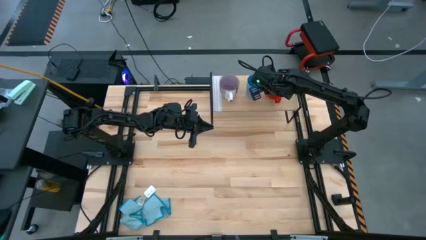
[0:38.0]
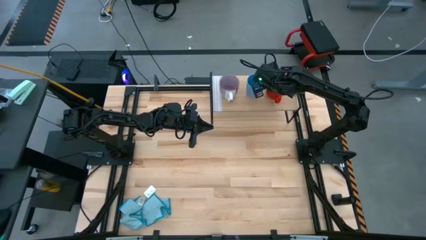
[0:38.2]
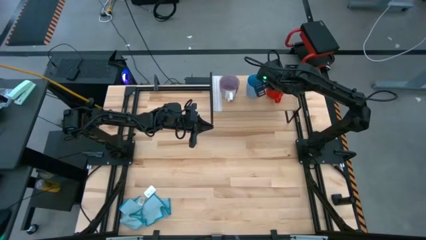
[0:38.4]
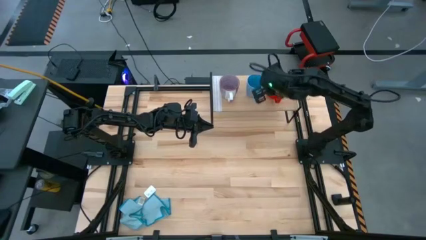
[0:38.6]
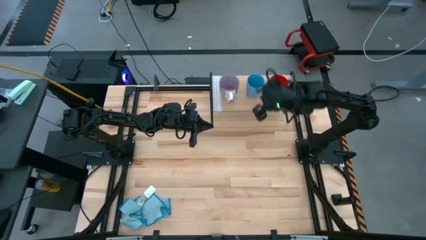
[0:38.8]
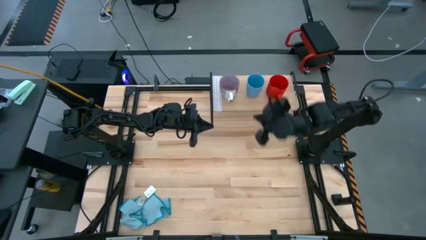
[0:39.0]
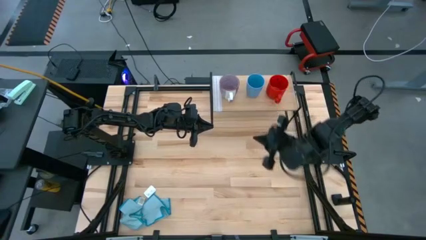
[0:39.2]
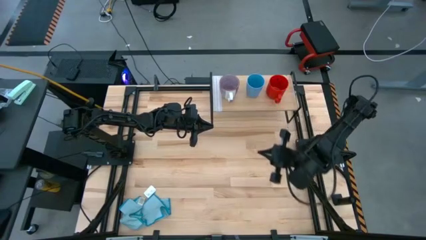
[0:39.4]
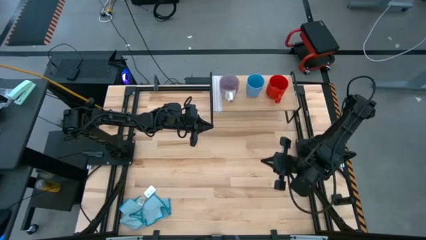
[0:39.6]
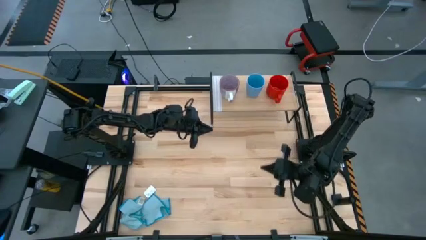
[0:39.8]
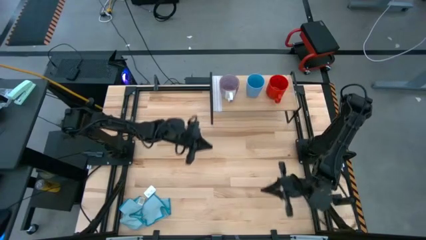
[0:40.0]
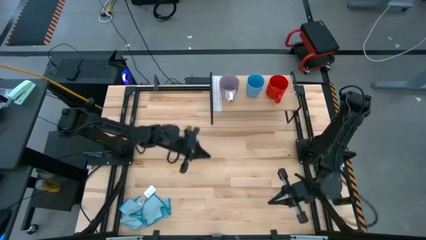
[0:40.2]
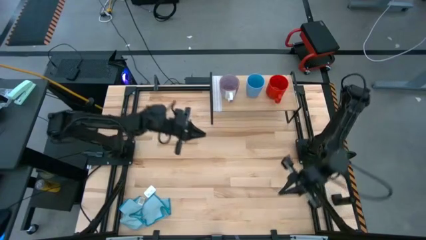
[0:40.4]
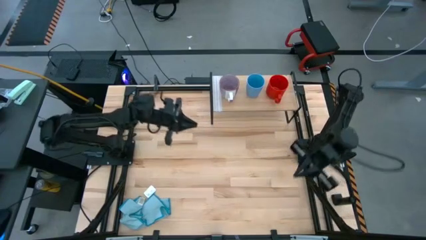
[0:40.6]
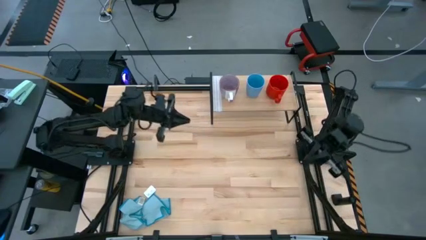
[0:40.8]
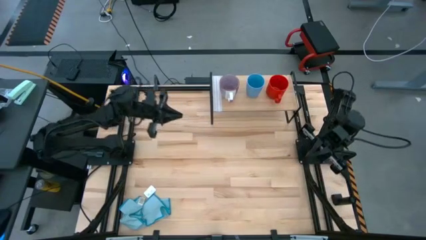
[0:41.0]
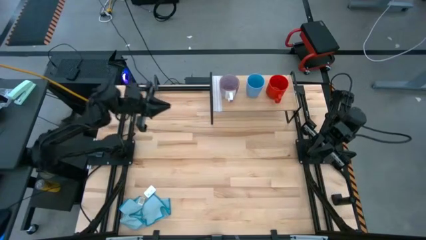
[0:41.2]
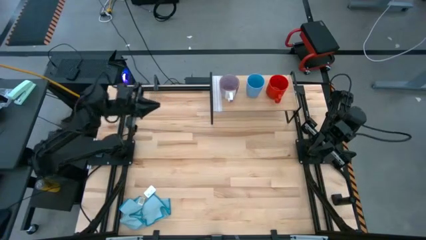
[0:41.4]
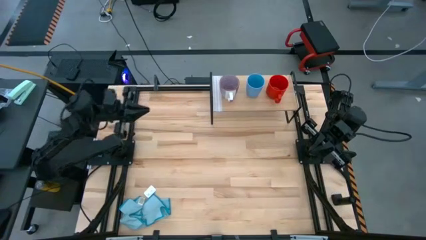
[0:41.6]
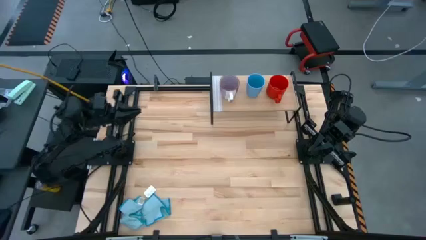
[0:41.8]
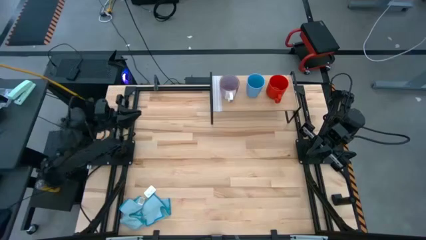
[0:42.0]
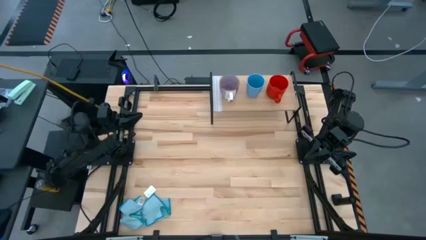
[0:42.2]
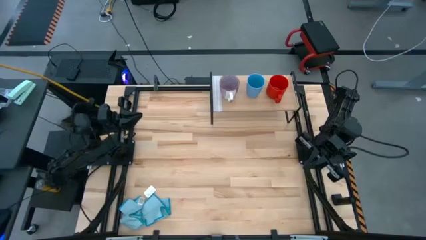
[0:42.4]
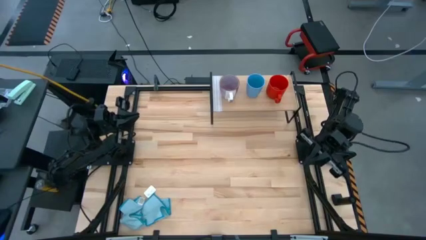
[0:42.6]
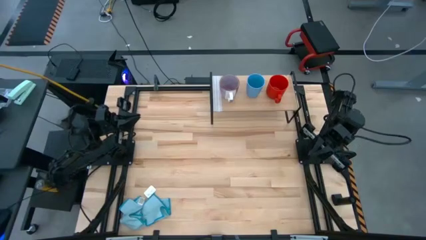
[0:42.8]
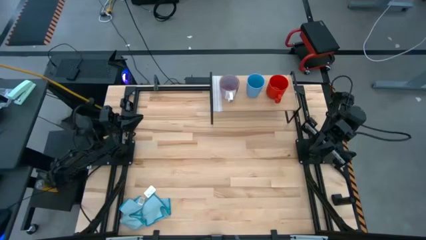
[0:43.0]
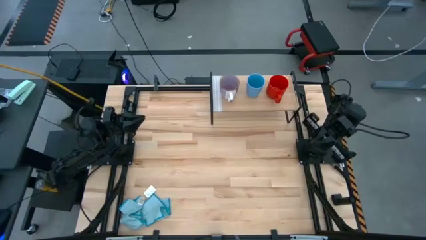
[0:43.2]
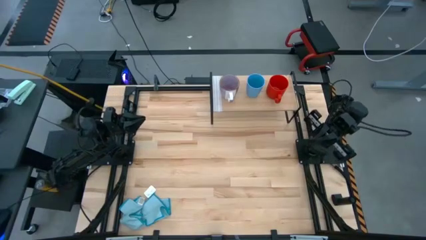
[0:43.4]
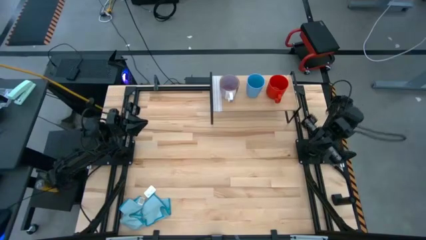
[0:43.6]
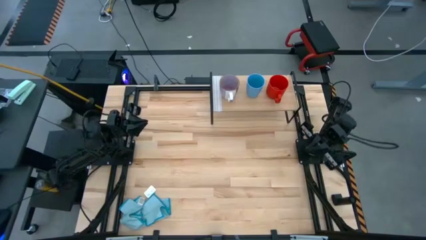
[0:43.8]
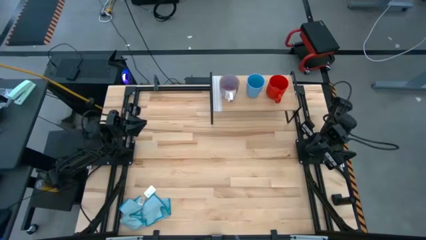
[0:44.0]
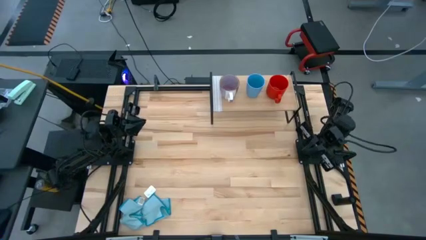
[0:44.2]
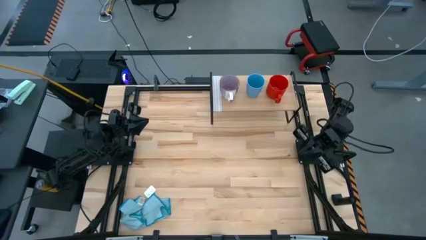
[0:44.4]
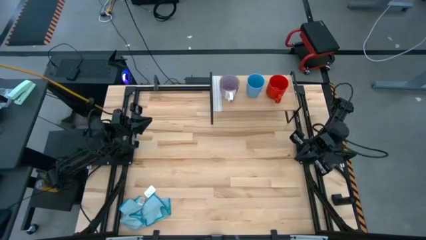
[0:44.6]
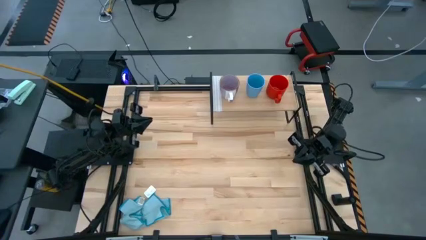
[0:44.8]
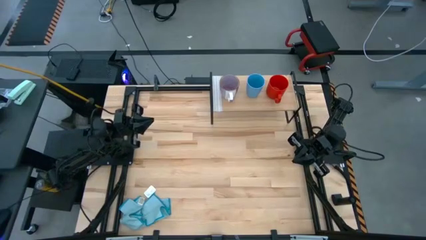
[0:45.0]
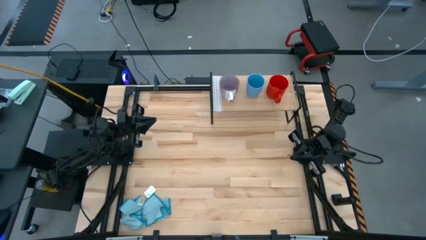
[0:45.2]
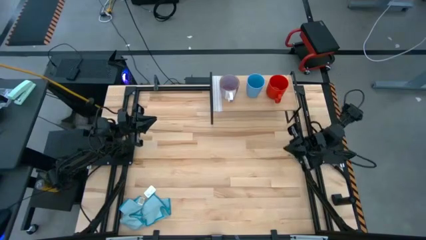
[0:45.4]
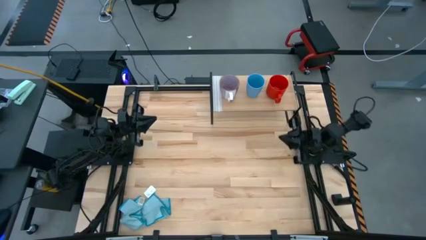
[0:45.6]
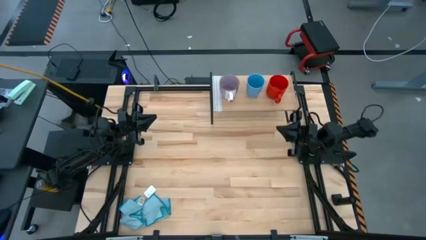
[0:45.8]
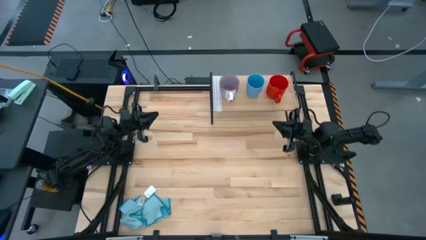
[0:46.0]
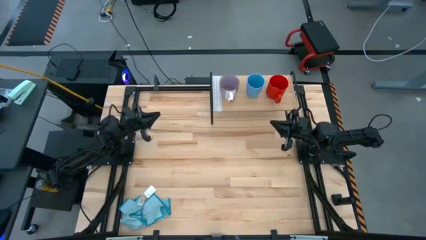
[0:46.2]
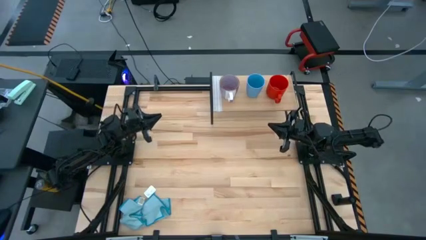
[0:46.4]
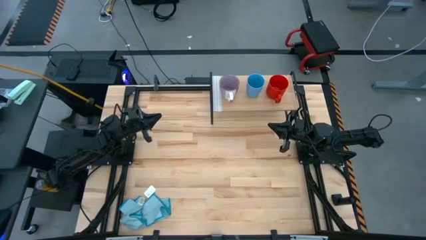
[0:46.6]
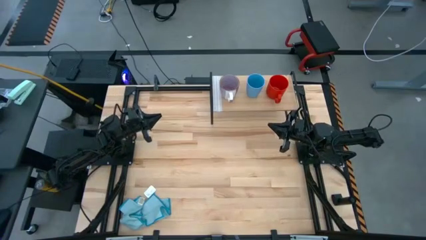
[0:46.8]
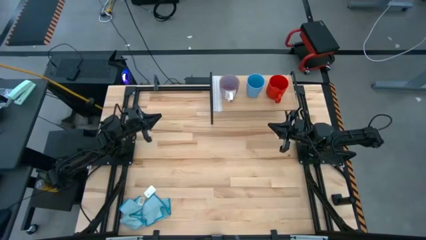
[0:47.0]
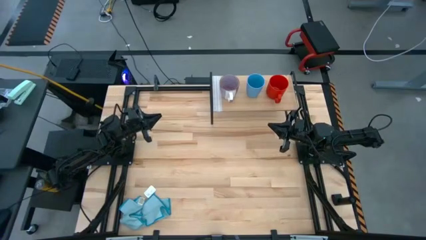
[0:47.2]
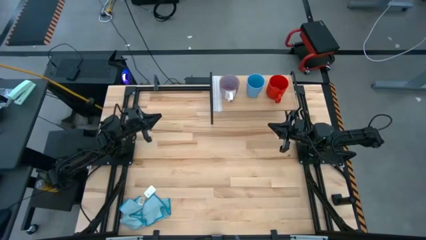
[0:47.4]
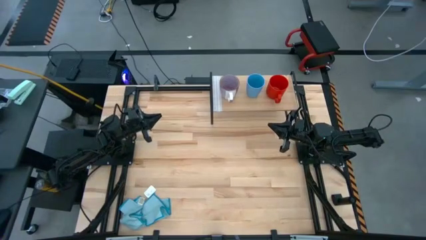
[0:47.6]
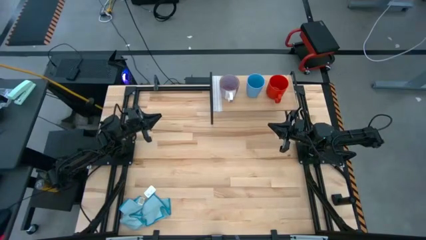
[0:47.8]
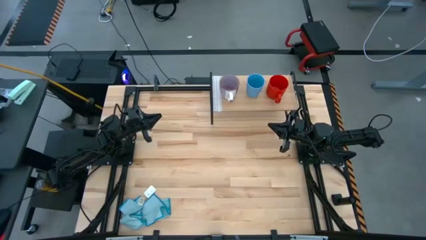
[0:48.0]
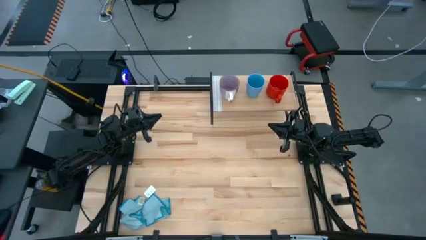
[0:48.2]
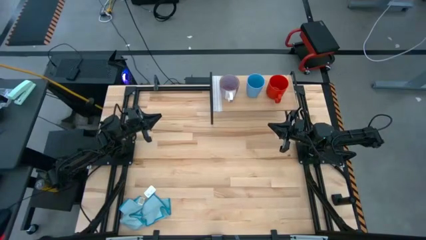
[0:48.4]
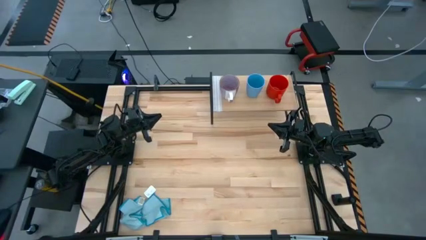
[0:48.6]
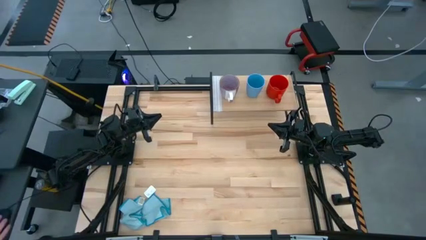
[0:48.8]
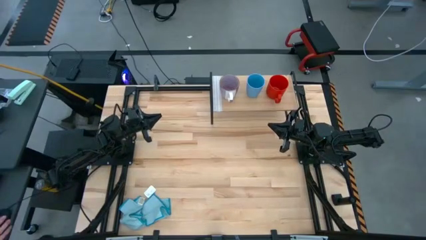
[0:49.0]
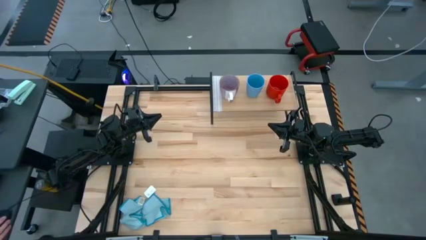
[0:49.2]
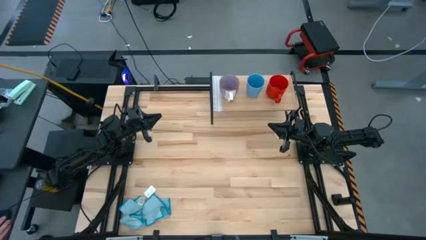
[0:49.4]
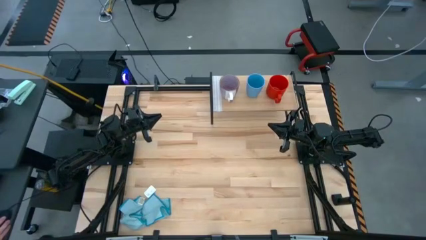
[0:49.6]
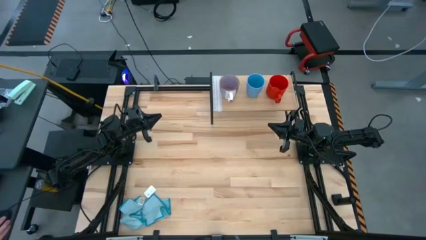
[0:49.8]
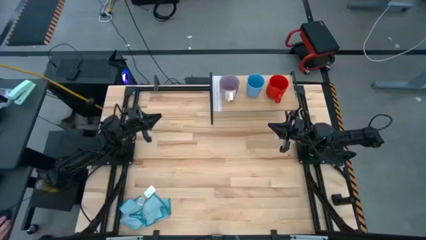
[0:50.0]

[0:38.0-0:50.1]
Task: Stack small to large cups/mugs on shelf
Return to Home Position

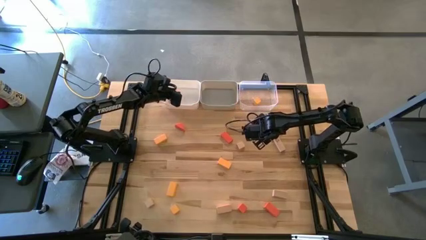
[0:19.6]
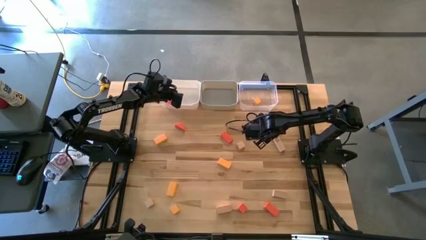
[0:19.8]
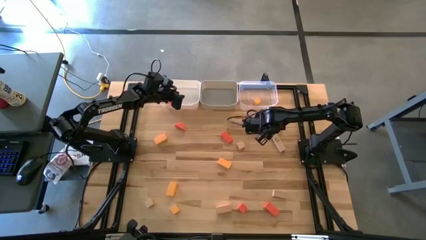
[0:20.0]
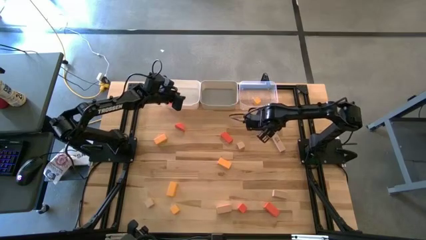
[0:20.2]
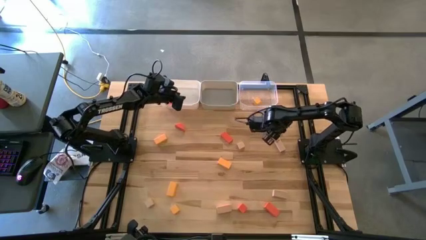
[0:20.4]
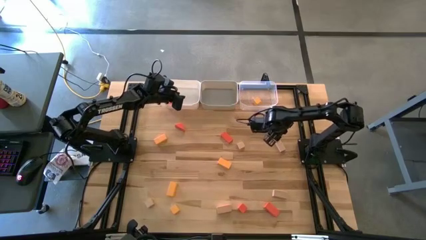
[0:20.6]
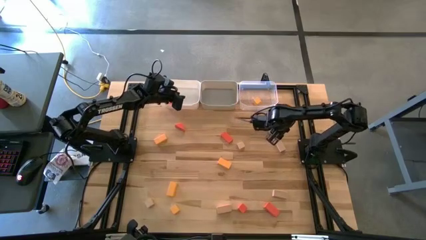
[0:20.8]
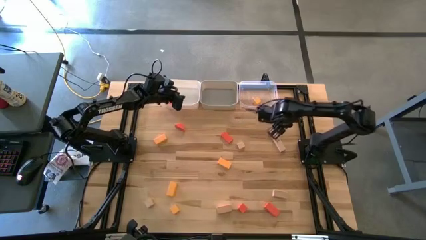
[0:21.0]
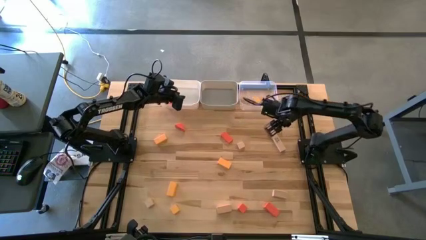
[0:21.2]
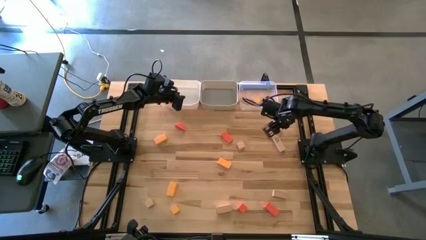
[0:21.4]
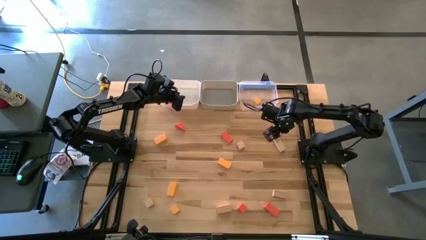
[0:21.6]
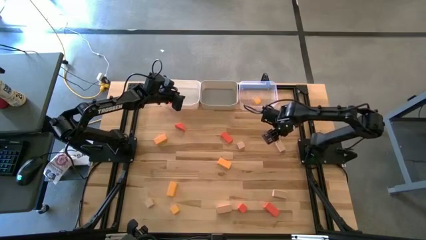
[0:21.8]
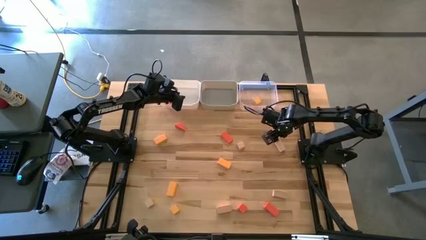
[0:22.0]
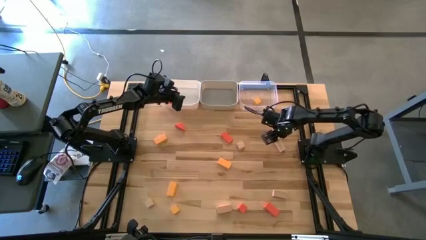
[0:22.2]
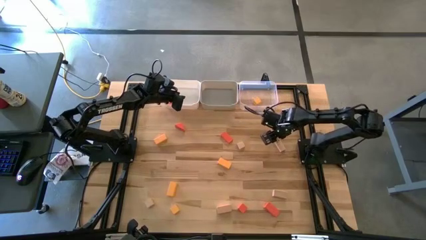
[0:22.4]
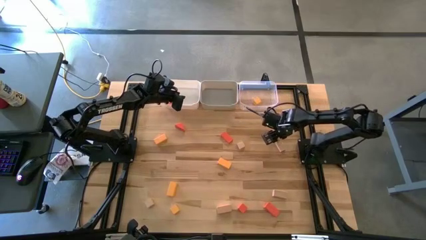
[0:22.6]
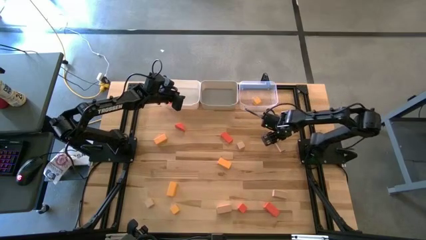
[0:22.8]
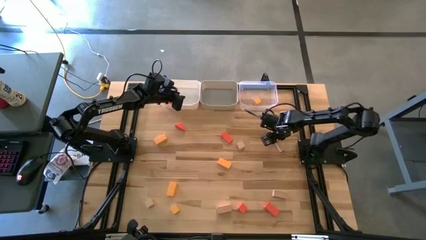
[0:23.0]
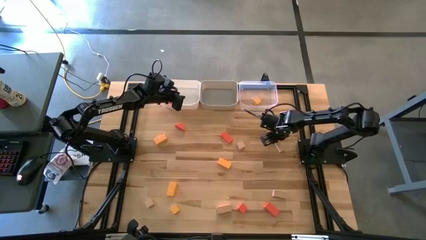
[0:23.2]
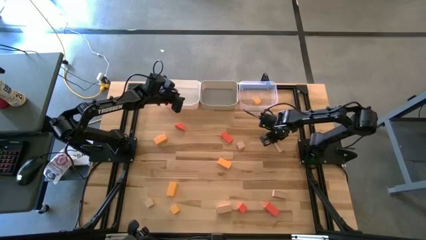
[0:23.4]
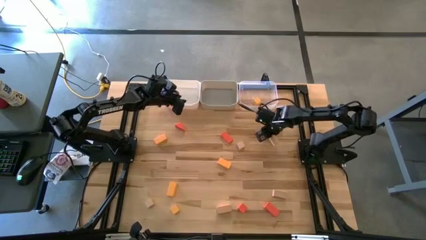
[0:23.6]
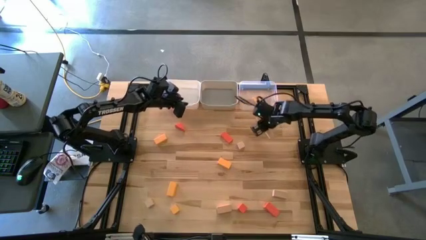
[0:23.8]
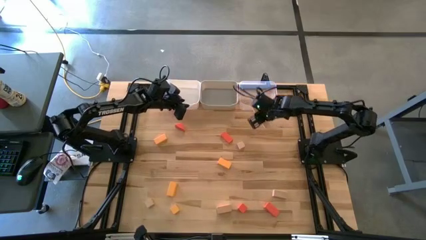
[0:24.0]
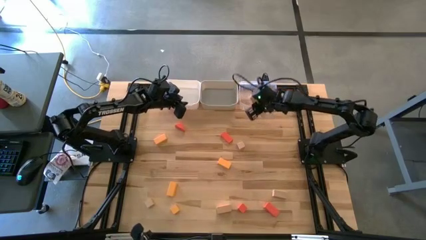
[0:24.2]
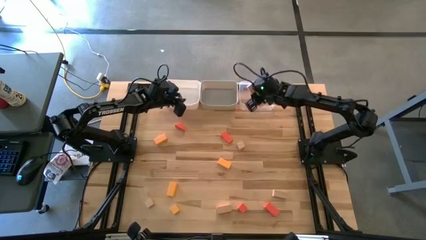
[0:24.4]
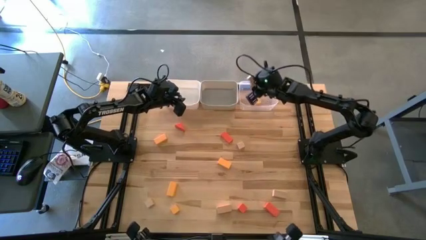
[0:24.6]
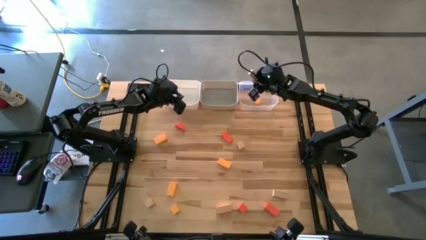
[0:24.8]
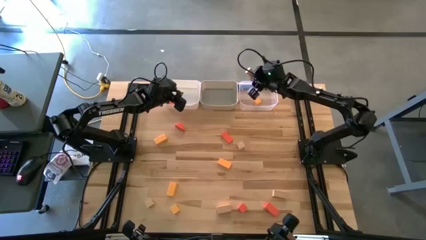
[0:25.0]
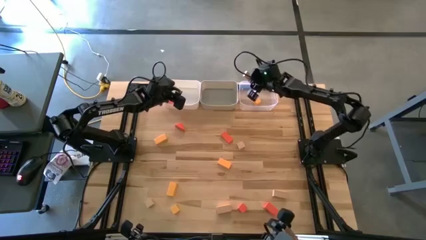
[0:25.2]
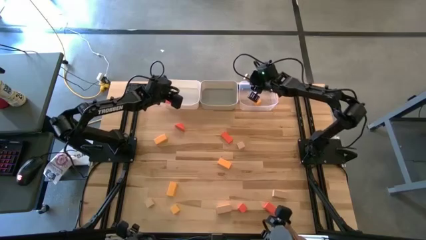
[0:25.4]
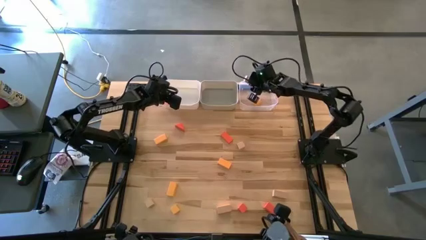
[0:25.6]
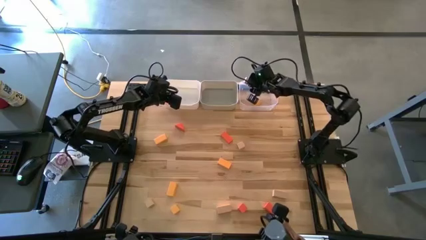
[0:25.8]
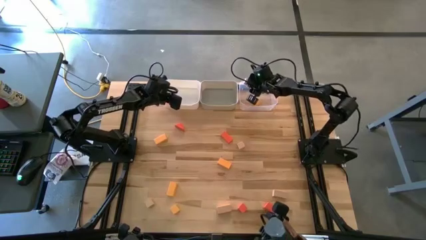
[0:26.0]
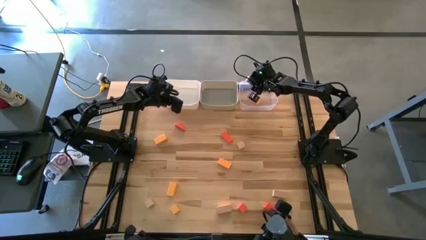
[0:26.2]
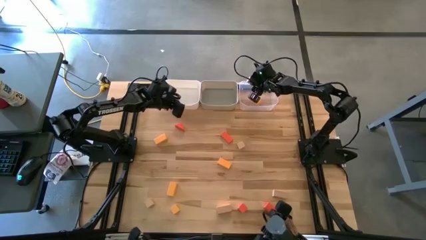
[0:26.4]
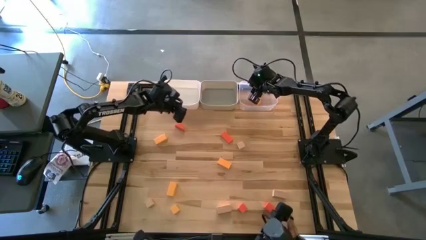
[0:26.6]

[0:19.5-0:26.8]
Task: Sort & place blocks by color
Put the brown block into the transparent bin
